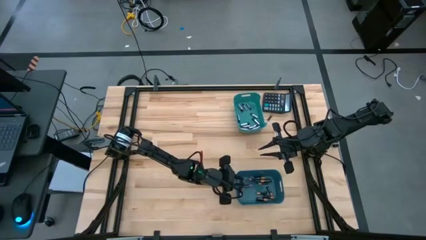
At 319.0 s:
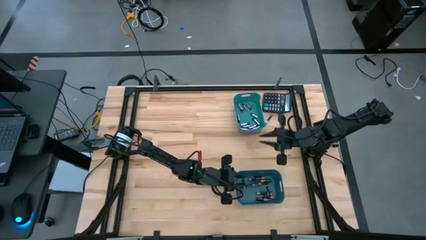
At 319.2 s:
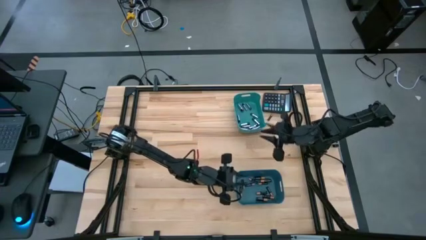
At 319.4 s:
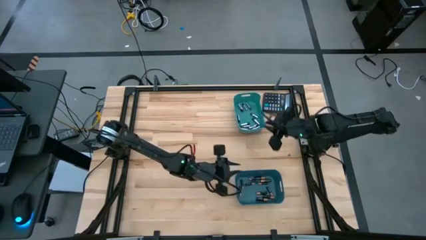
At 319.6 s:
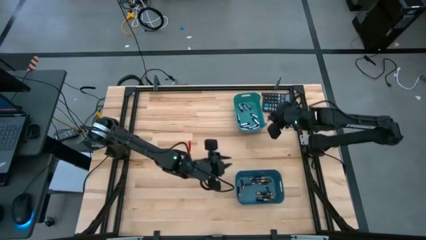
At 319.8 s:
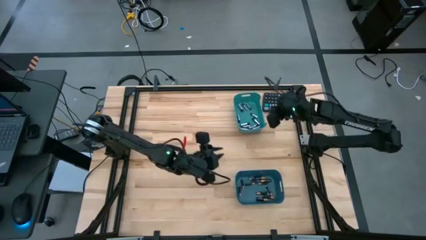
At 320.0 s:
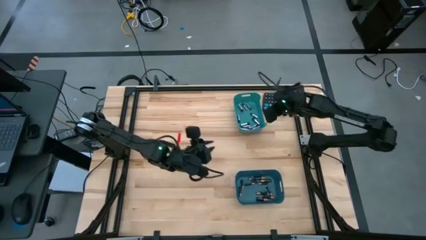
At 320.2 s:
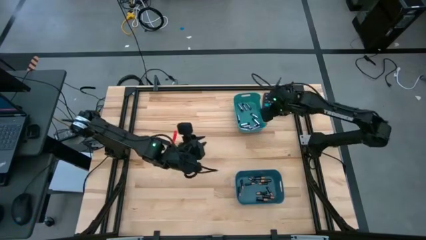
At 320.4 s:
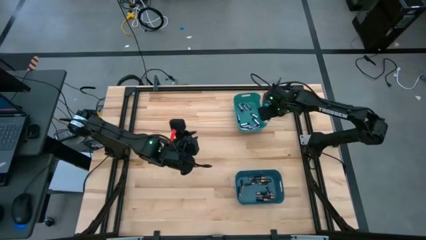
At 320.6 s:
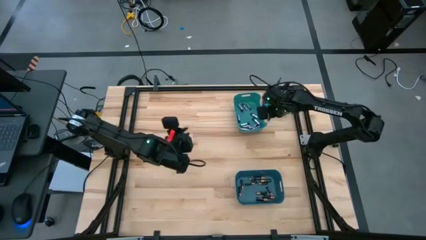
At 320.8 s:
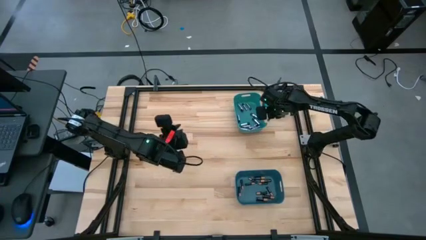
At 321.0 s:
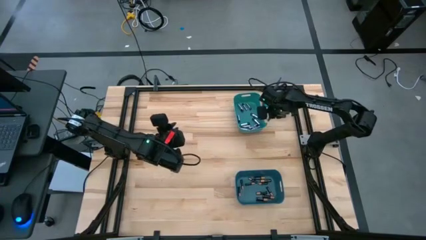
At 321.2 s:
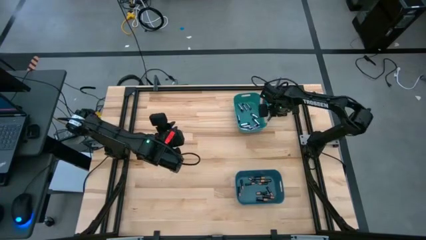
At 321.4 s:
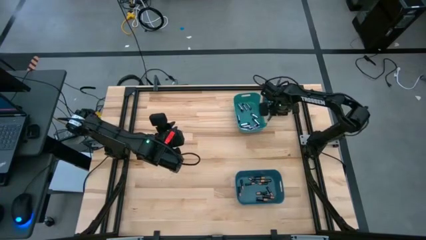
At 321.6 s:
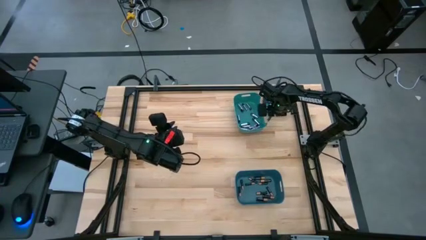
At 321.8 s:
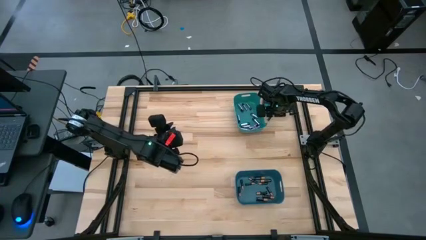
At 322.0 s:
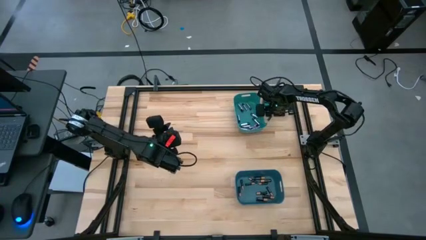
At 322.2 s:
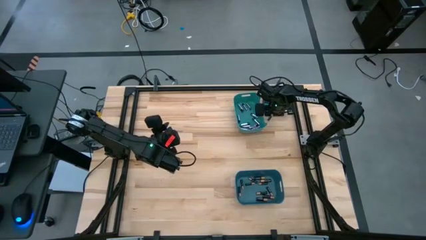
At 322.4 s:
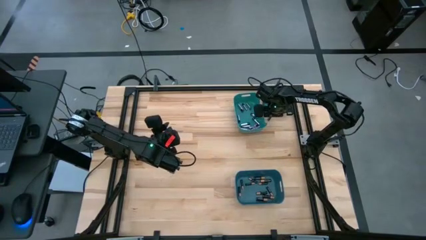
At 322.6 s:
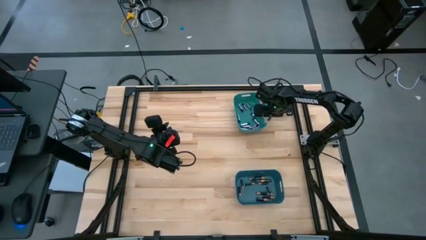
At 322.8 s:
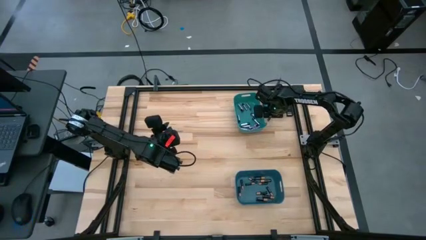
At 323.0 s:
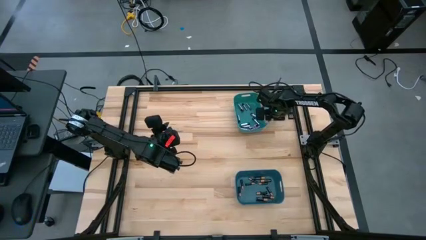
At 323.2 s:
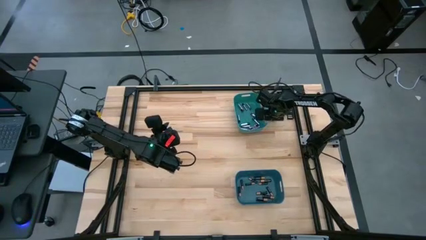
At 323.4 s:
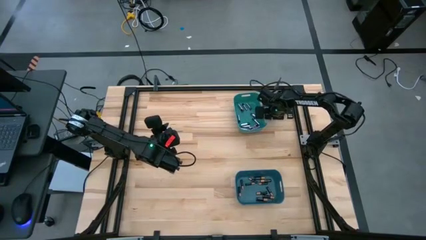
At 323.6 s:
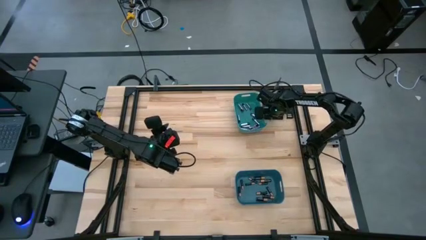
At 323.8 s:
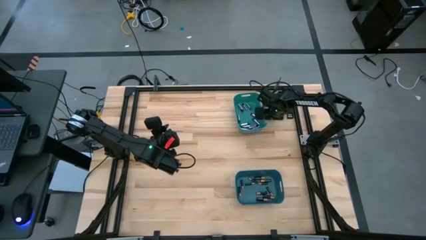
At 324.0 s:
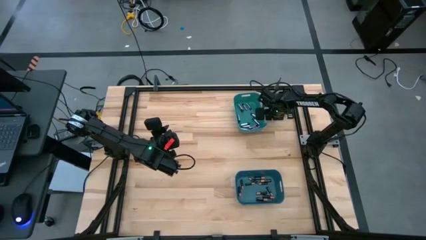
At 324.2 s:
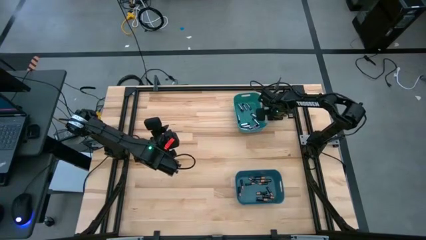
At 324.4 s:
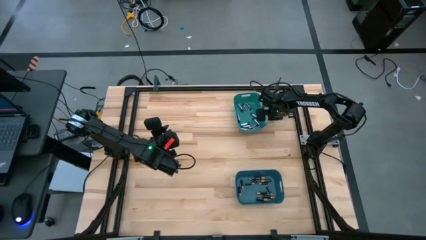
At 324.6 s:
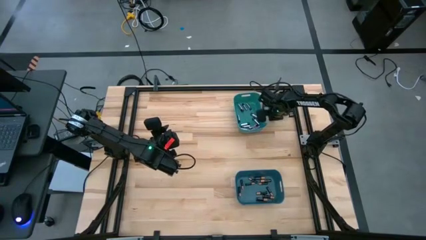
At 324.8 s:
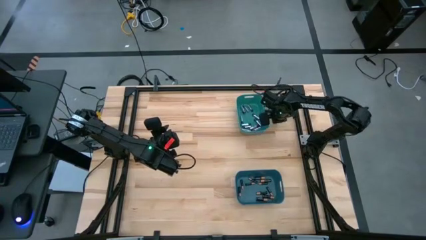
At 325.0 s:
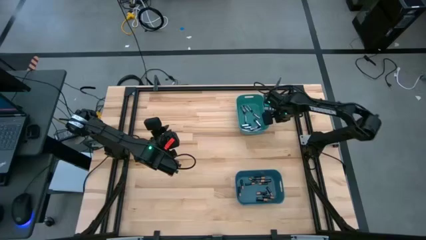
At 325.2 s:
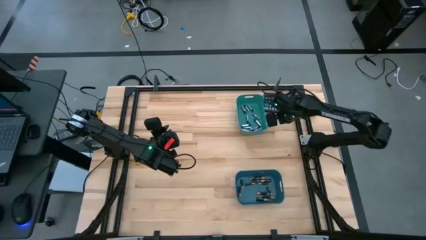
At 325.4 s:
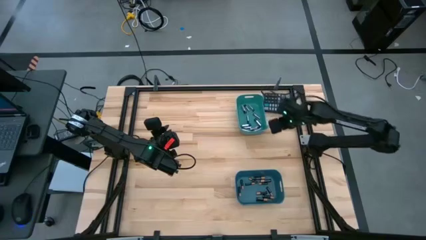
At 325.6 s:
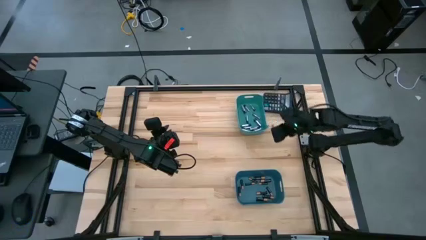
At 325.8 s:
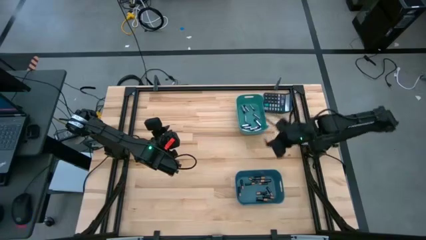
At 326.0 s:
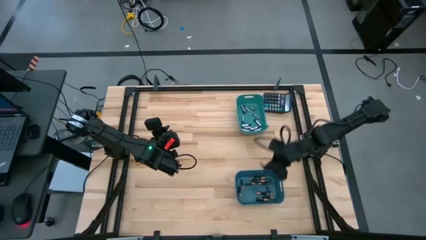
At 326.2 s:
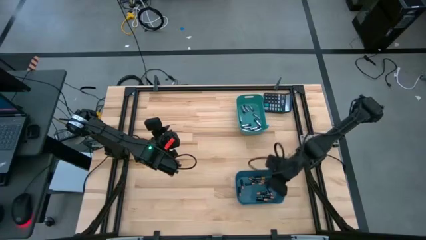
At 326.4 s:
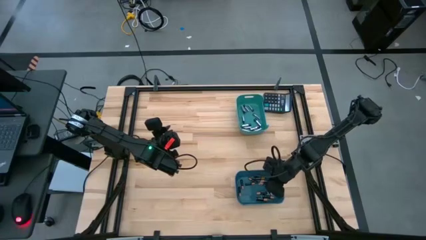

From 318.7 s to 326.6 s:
Task: Sort batteries
Put the black battery into the blue bin

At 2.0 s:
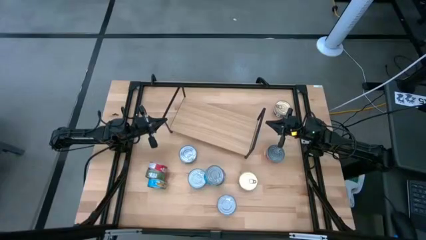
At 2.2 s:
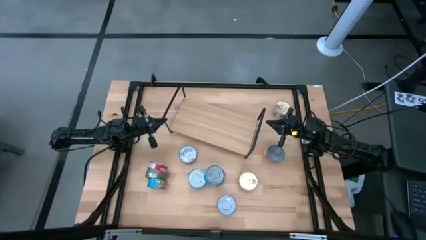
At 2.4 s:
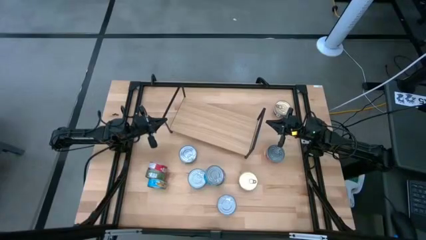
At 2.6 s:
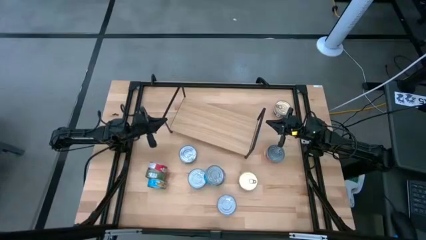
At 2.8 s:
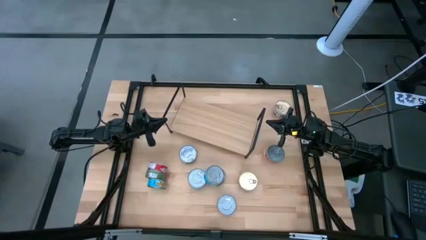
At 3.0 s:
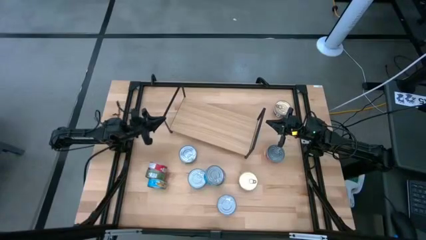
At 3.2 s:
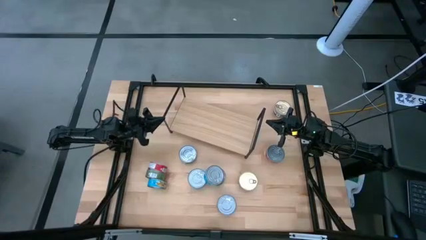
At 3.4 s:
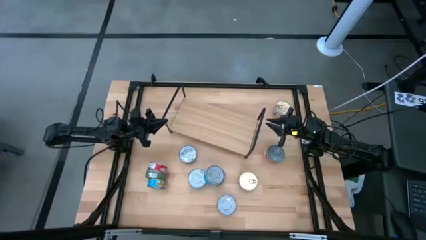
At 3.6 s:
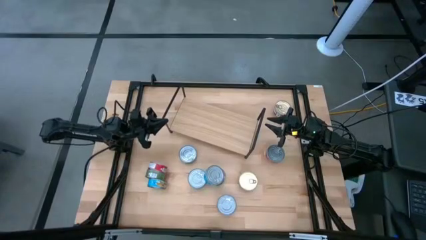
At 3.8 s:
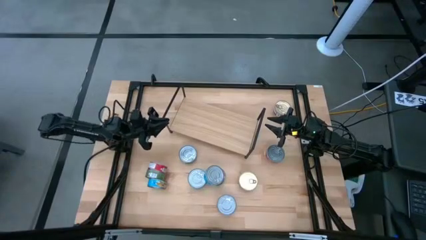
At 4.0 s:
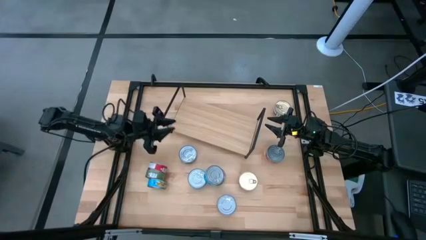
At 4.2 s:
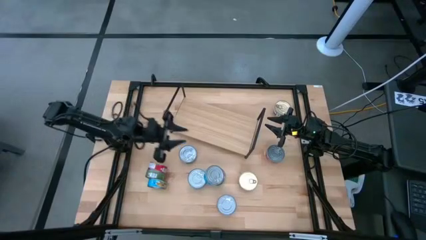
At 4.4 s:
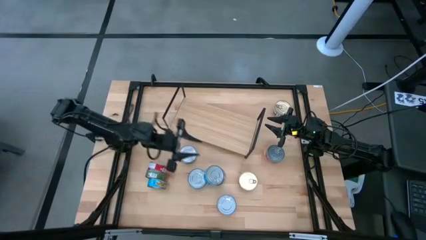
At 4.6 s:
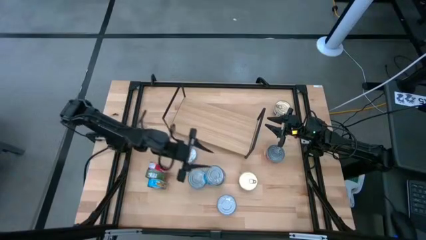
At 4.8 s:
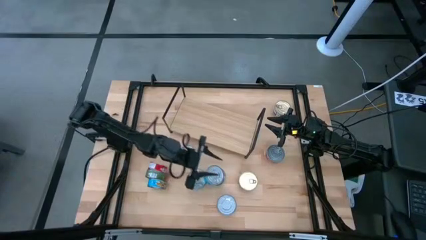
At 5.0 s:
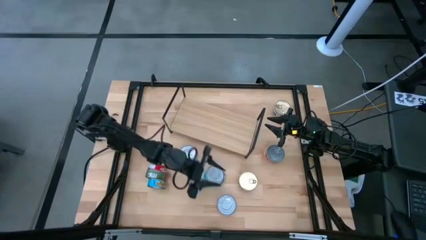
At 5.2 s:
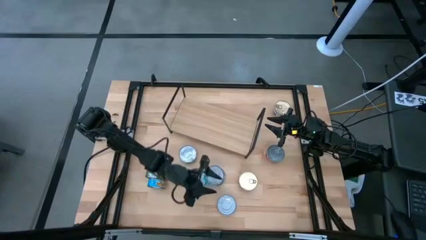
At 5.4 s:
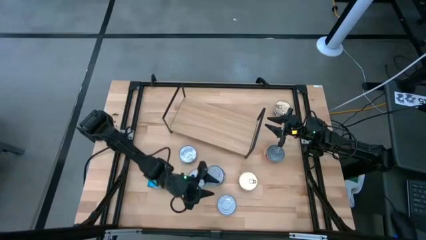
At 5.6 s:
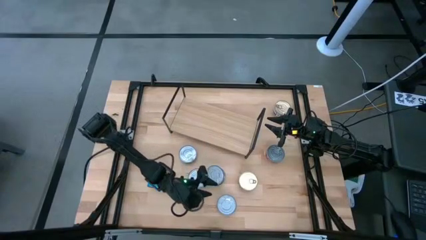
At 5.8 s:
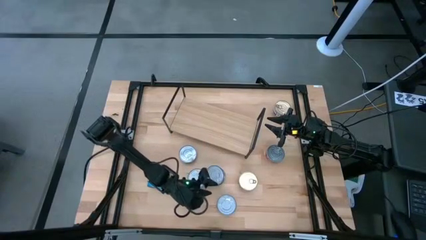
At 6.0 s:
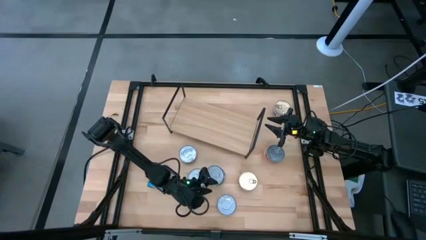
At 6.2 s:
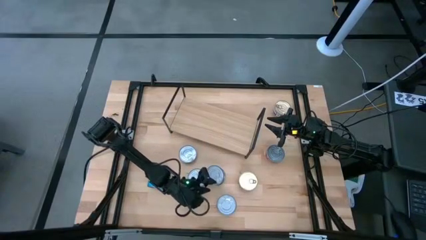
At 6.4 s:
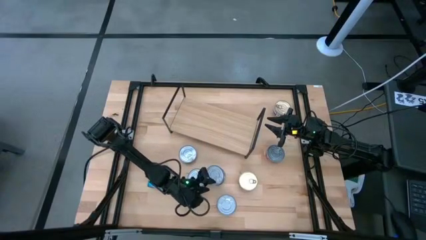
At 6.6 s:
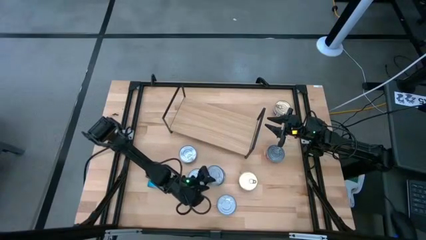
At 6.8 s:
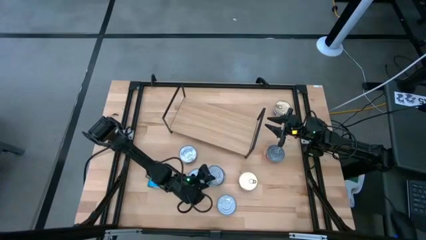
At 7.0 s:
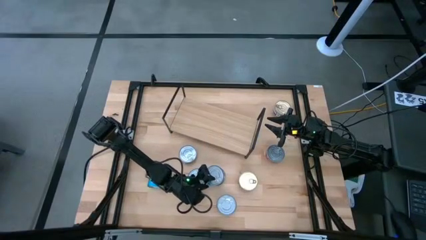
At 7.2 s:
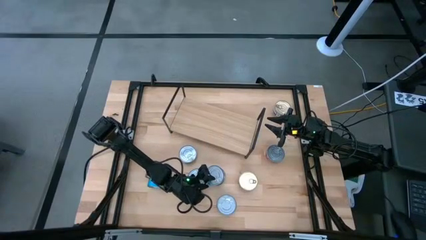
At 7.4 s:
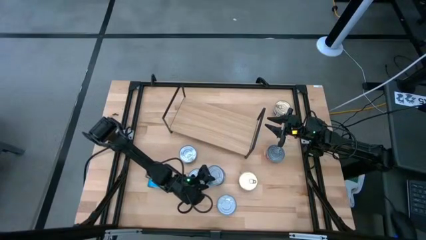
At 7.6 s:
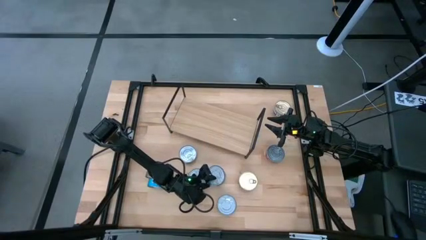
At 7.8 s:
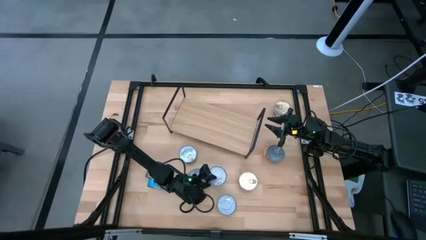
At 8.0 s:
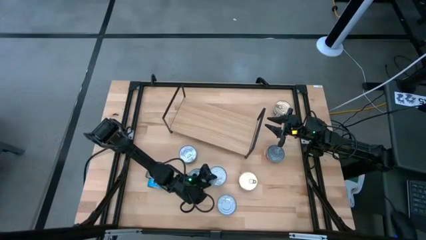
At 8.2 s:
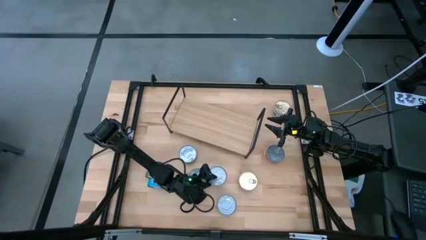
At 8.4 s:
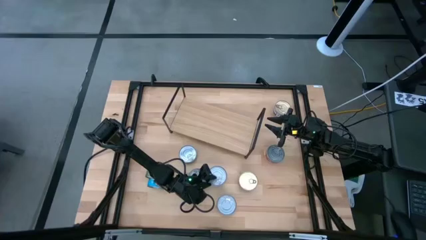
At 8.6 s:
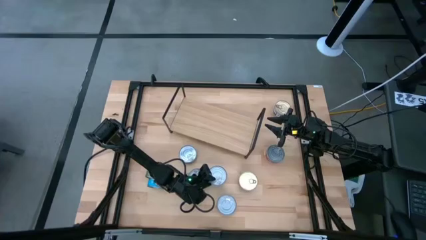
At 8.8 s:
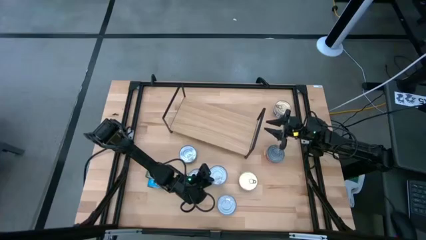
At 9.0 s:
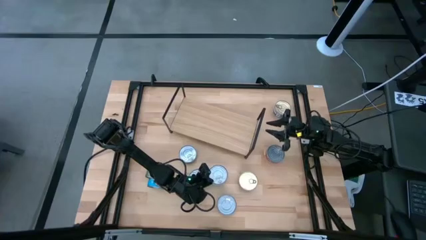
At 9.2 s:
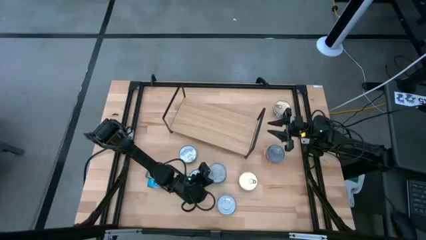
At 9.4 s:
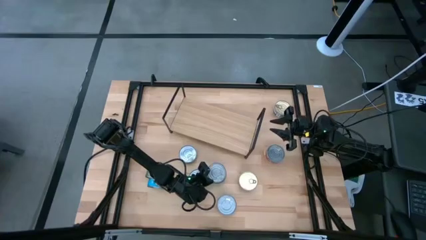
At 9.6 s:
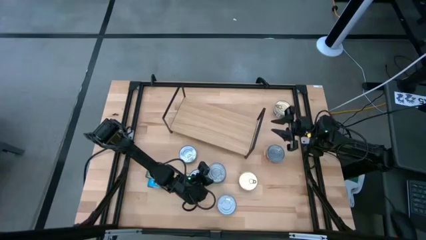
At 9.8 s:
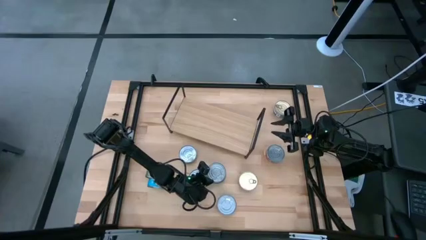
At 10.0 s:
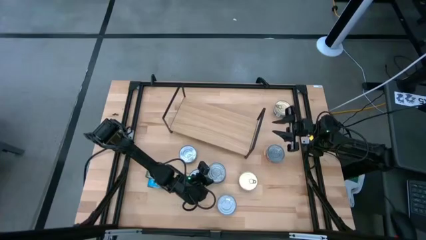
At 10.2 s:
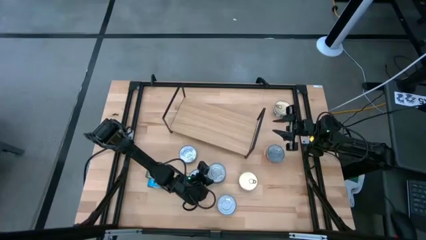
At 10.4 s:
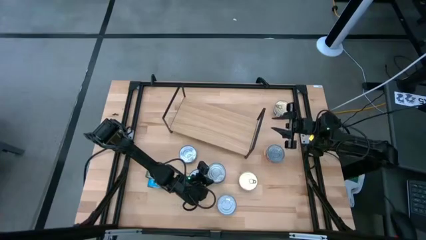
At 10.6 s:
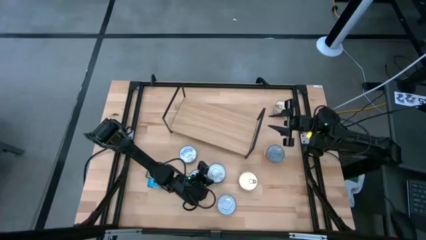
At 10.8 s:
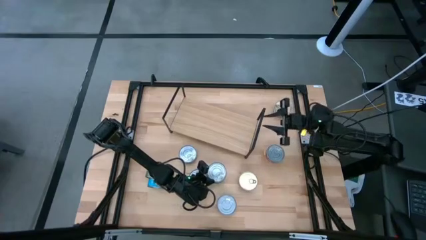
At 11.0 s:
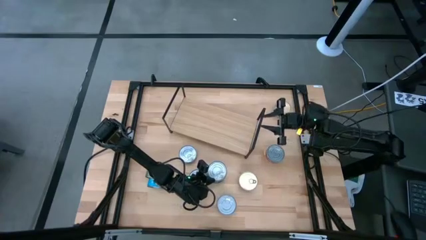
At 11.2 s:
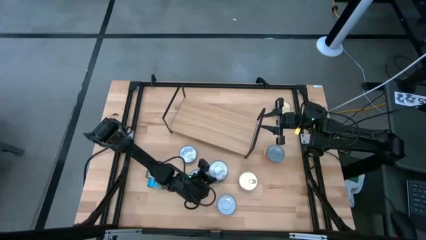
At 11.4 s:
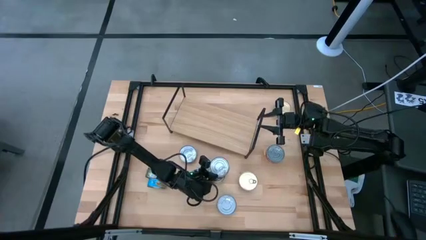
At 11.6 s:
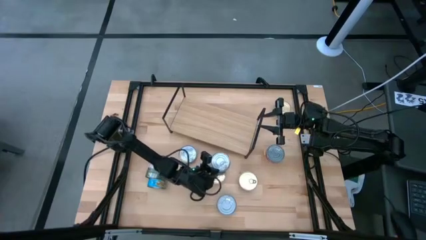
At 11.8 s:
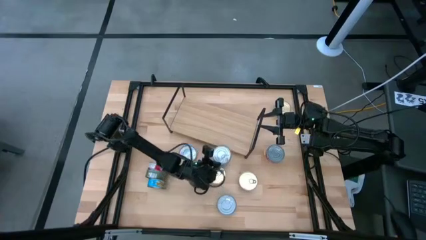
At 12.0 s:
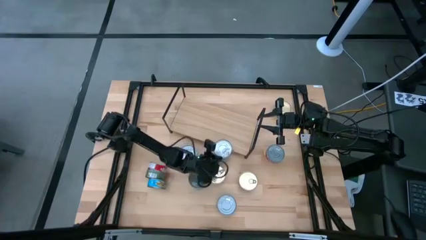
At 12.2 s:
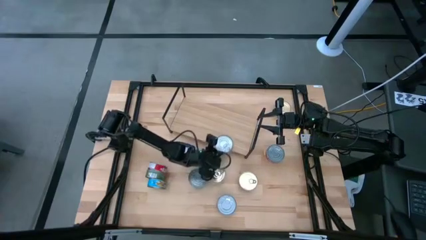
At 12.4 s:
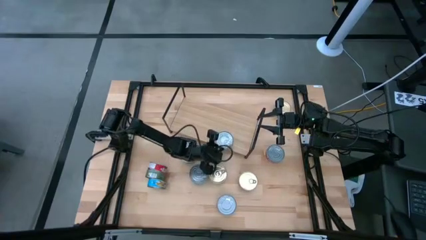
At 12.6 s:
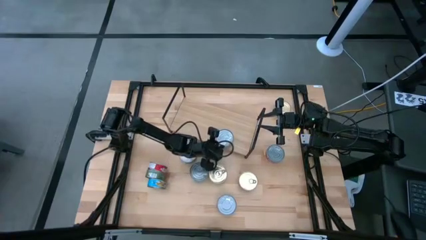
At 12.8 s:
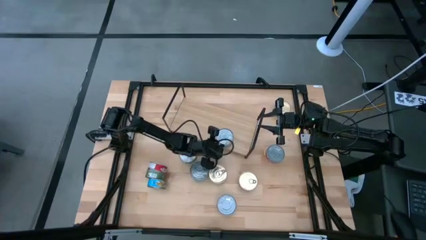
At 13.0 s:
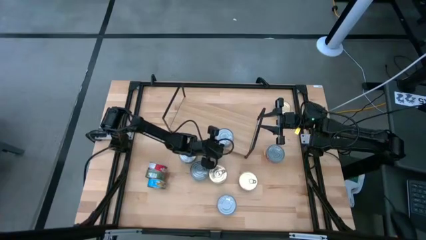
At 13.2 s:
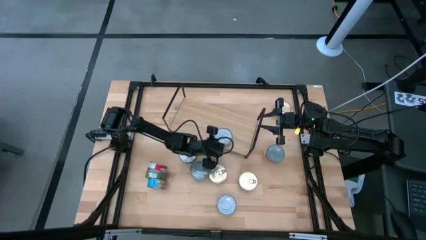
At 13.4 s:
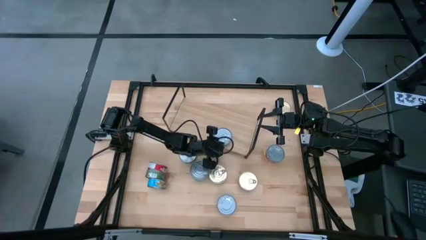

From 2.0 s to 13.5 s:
Task: Stack canned seafood by type on shelf
Put the yellow-blue tuna can on the shelf
